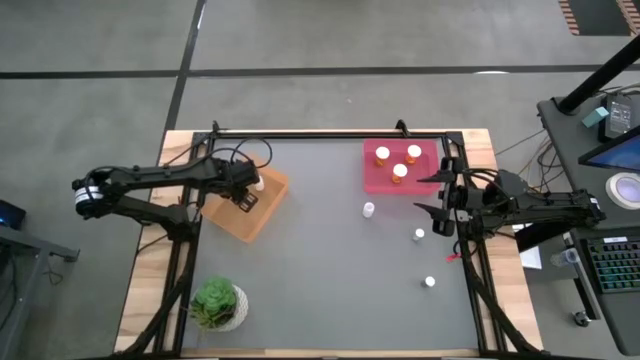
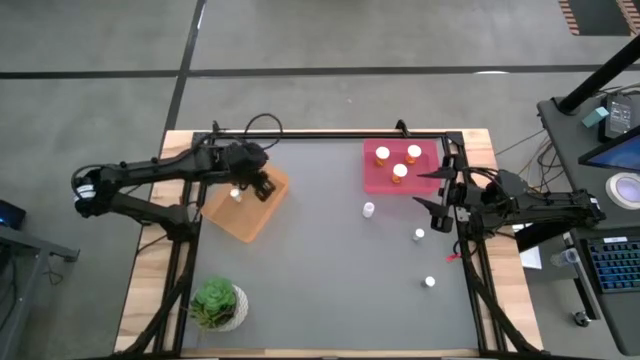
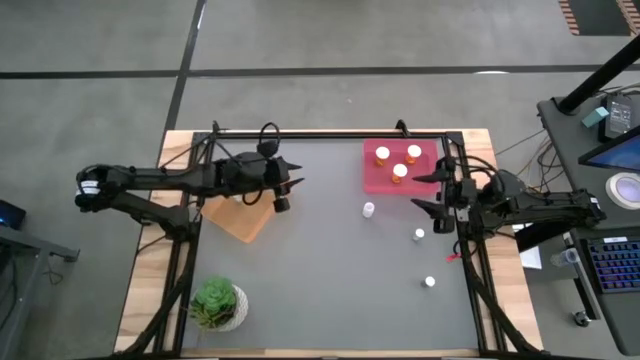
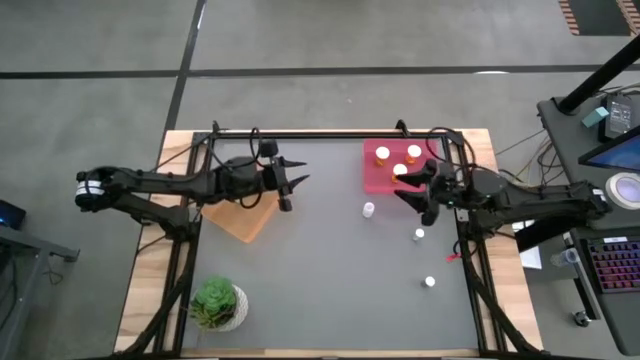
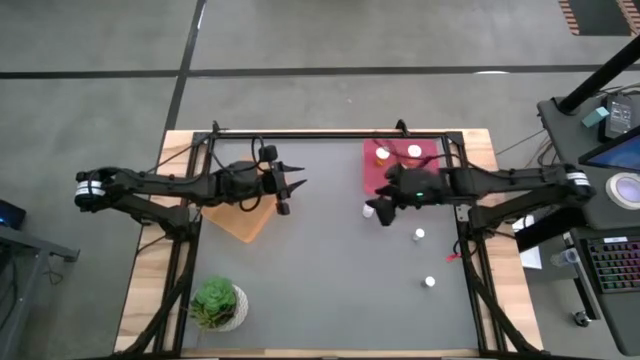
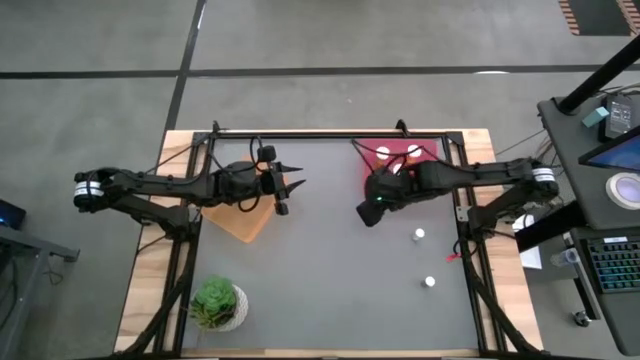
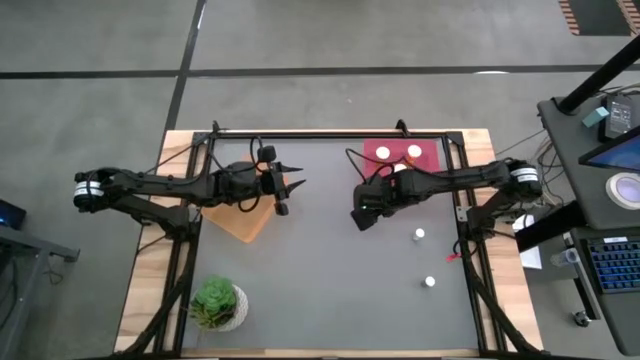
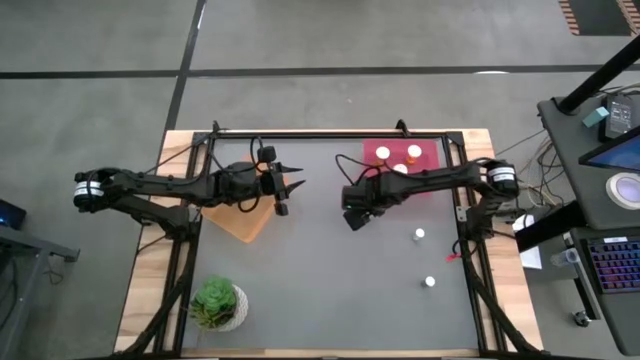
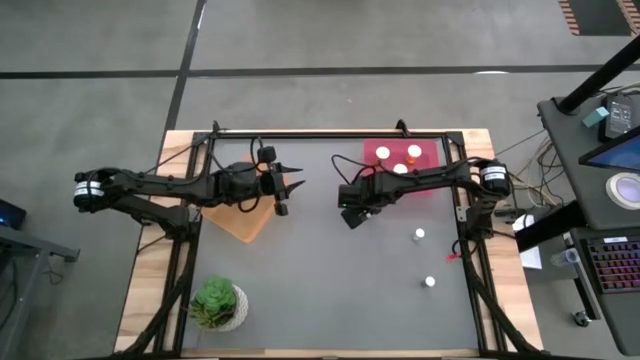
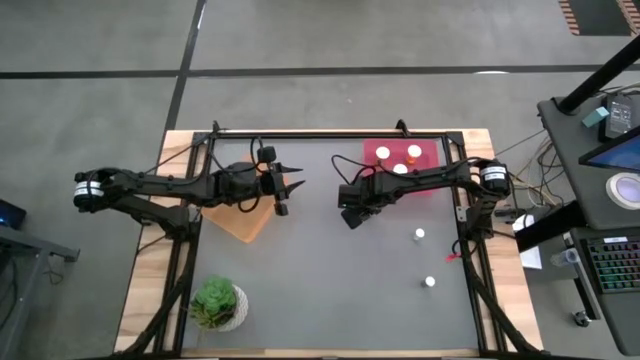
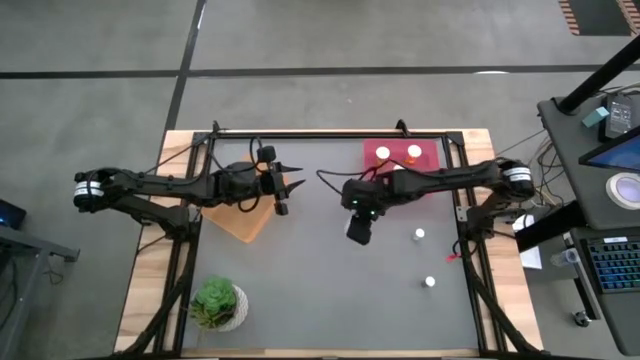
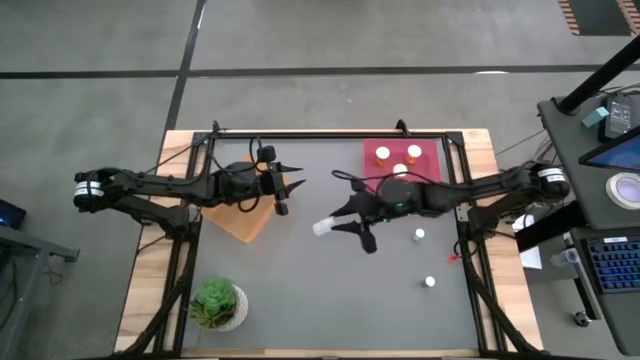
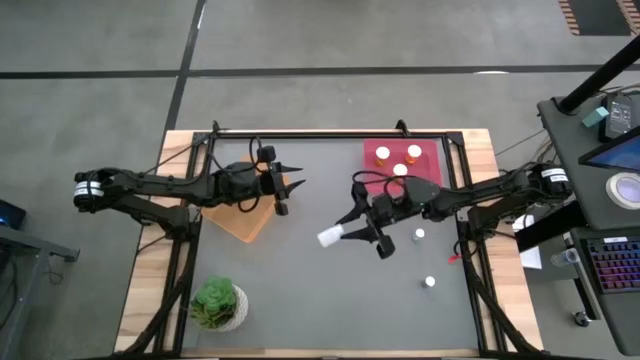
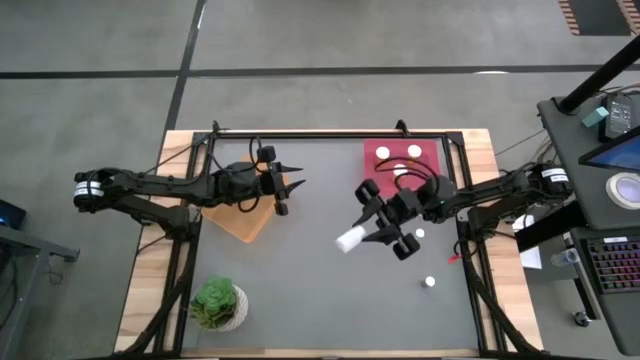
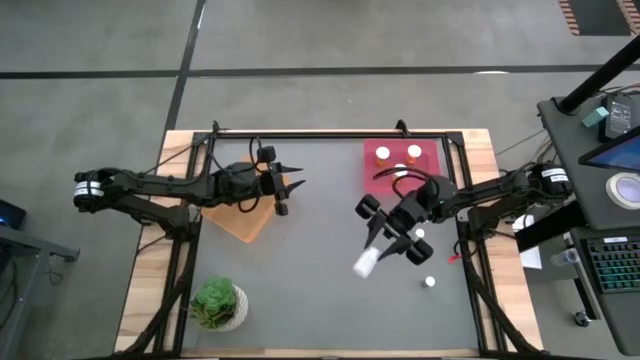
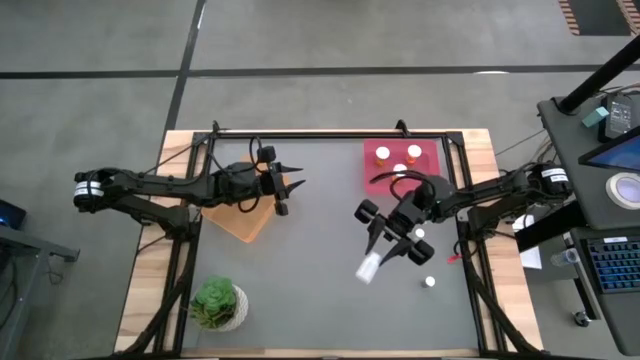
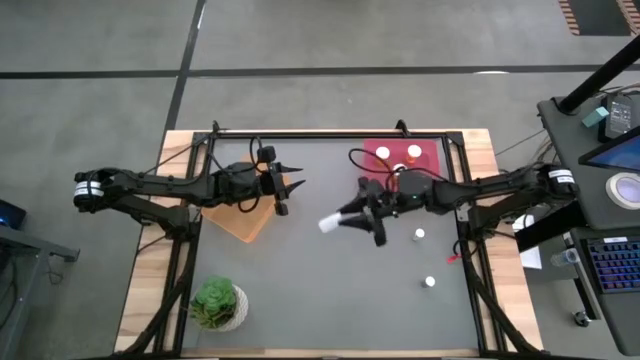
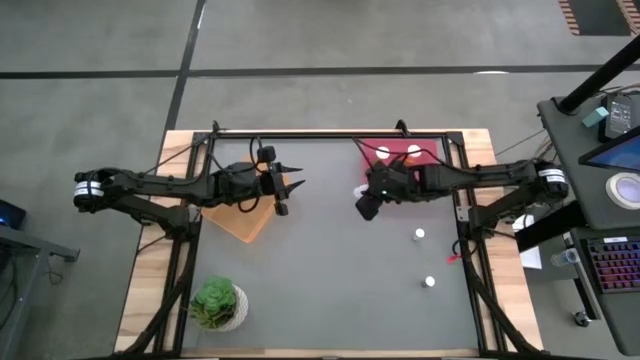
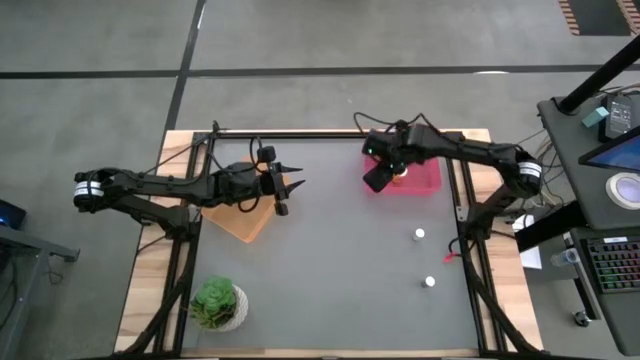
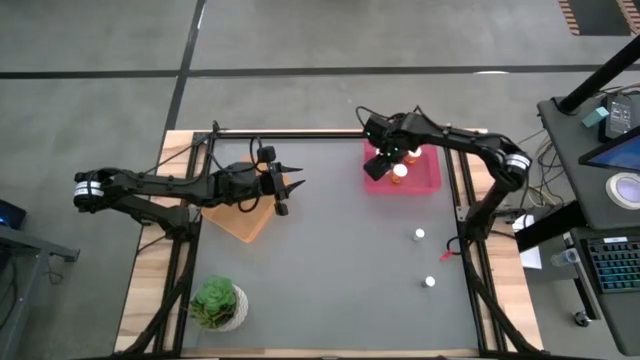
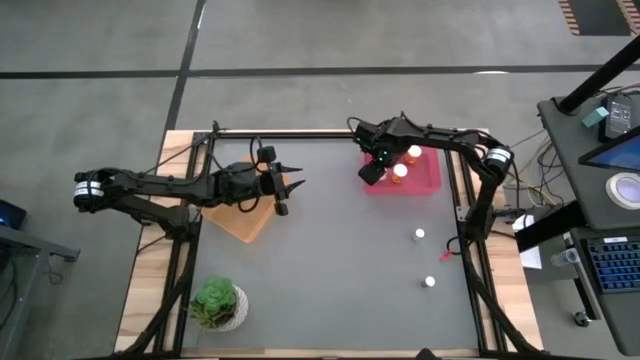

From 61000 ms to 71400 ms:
Task: Pick and place medicine bottles into bin by pill shape (circle, oval)
Put the transparent capsule bottle into the pink bin

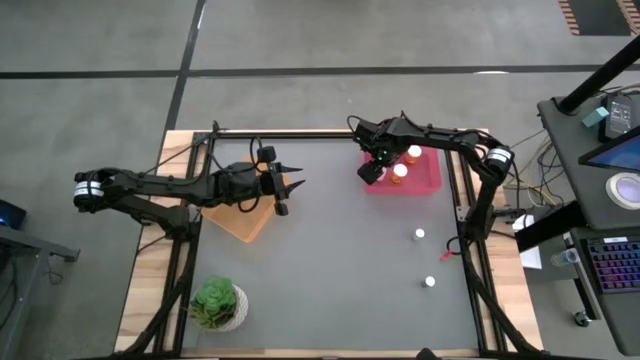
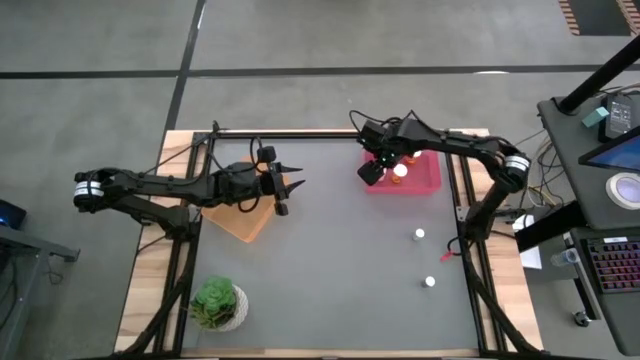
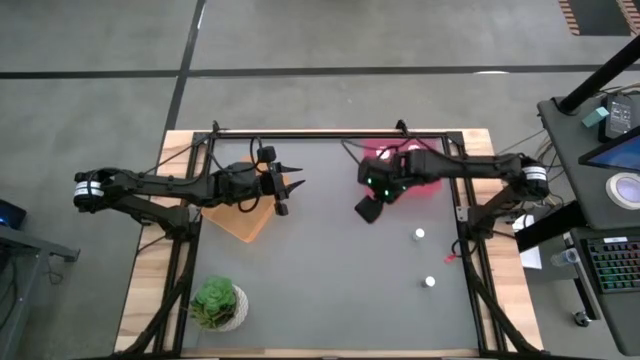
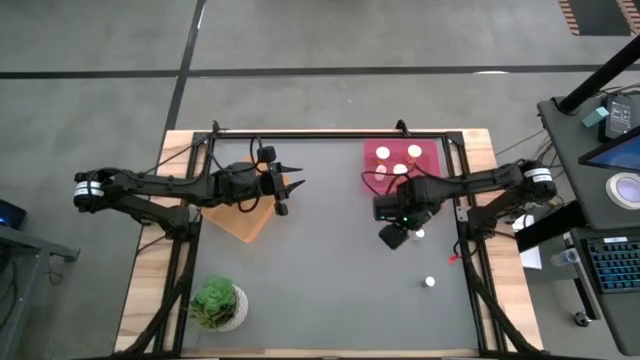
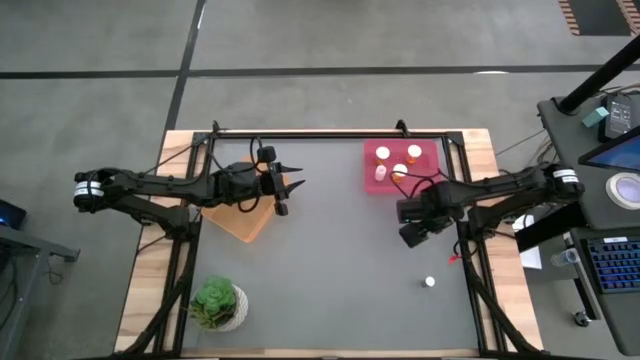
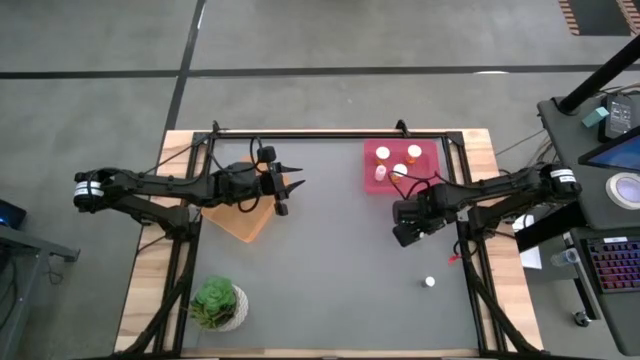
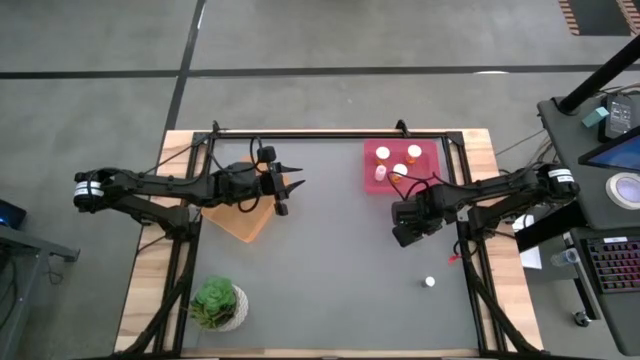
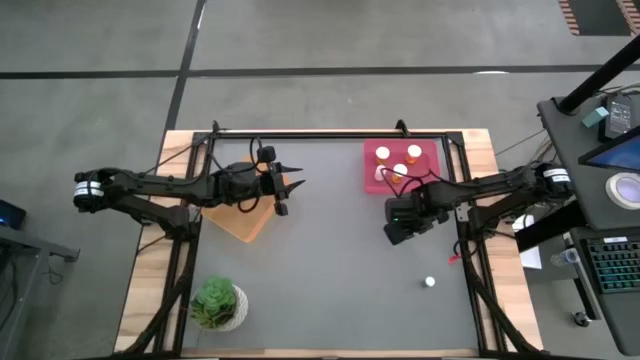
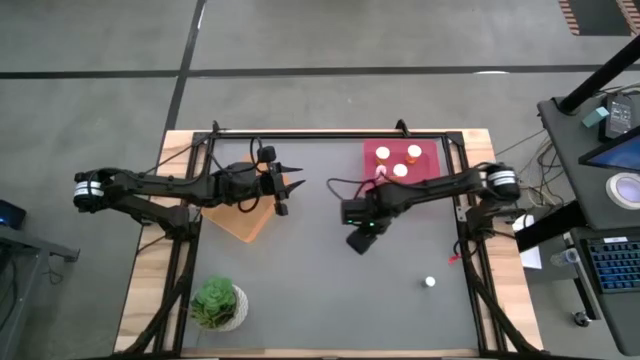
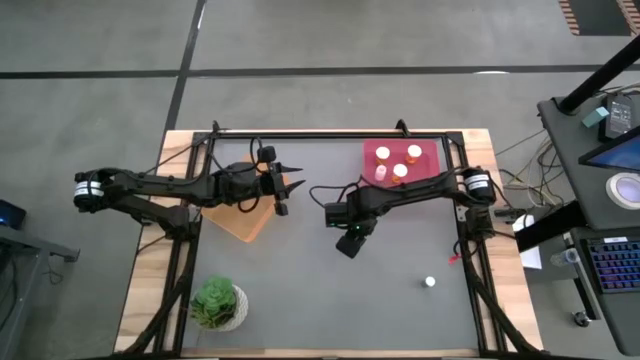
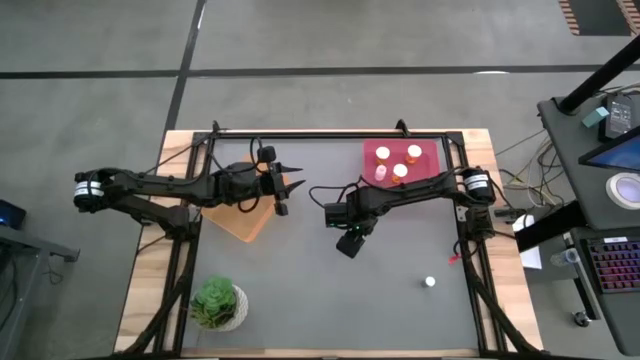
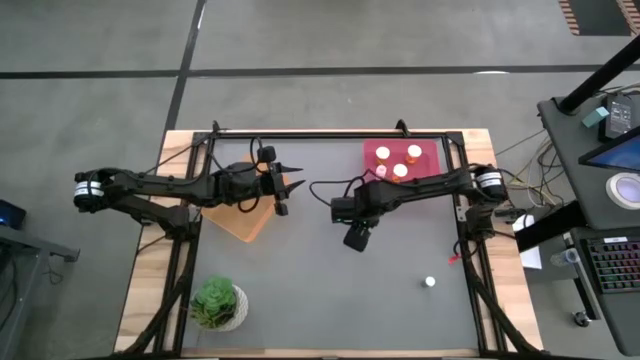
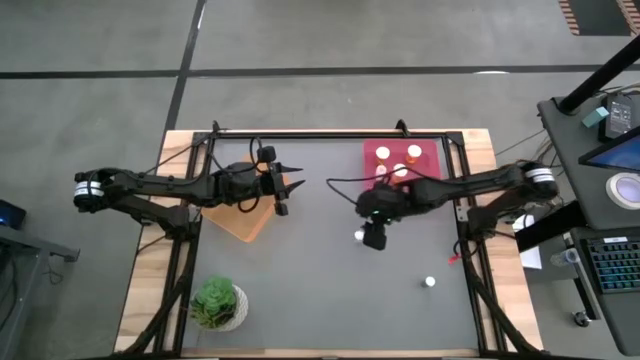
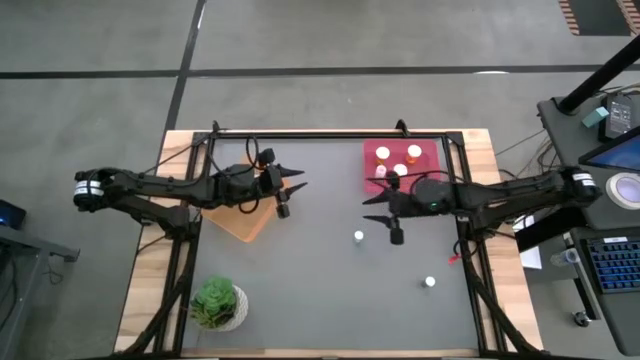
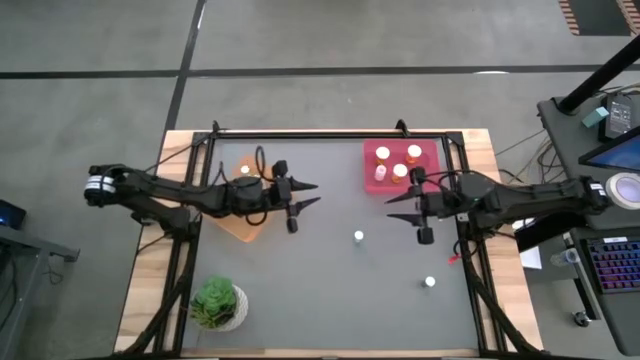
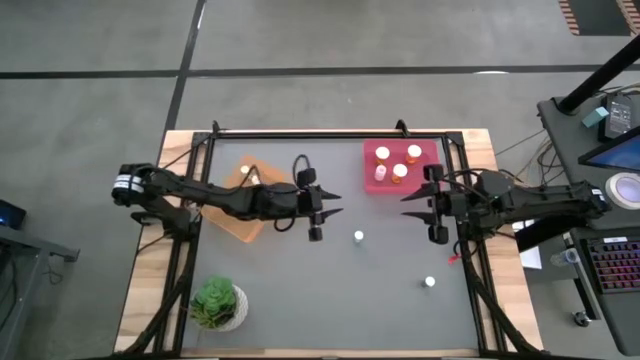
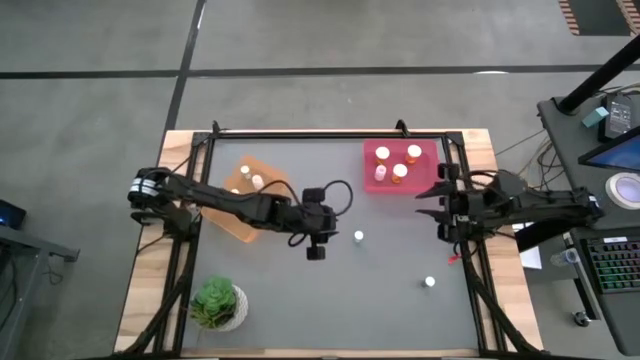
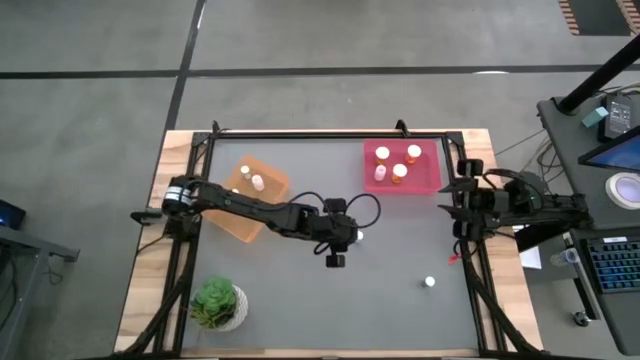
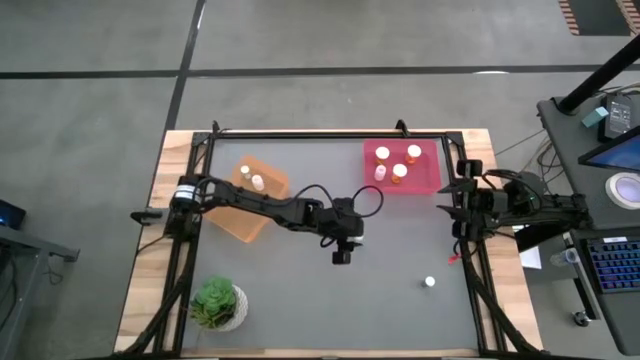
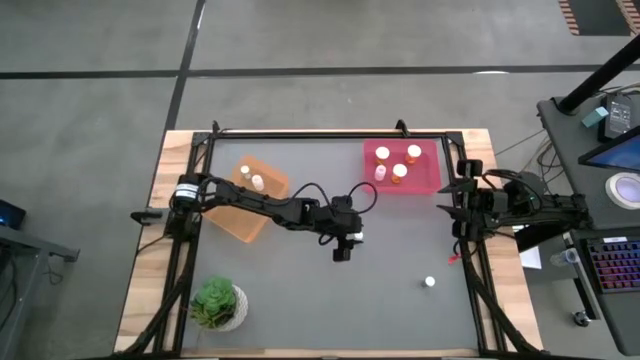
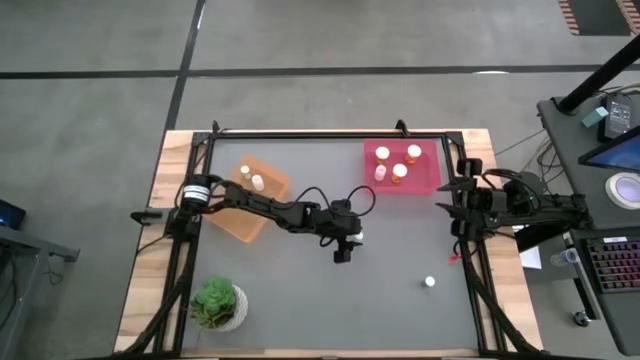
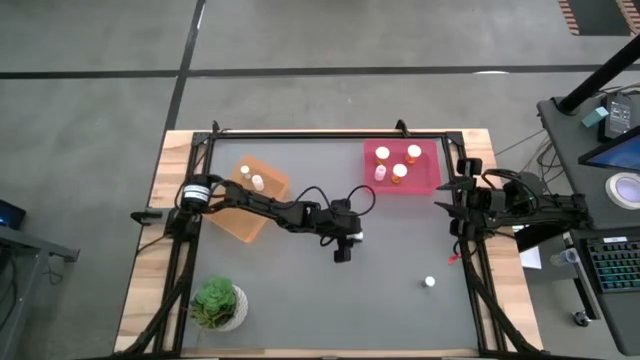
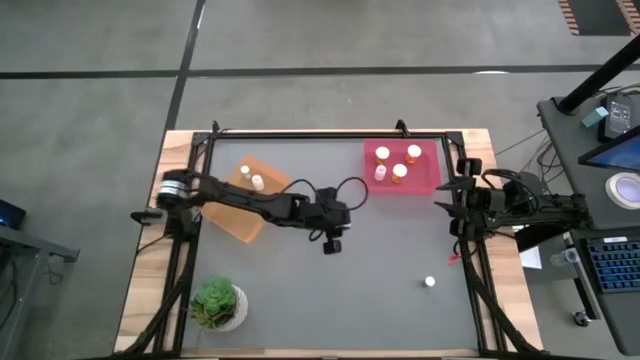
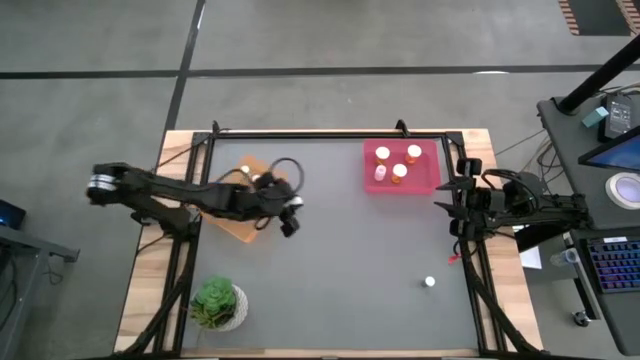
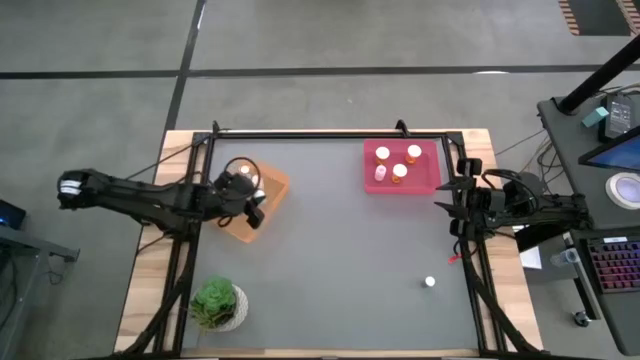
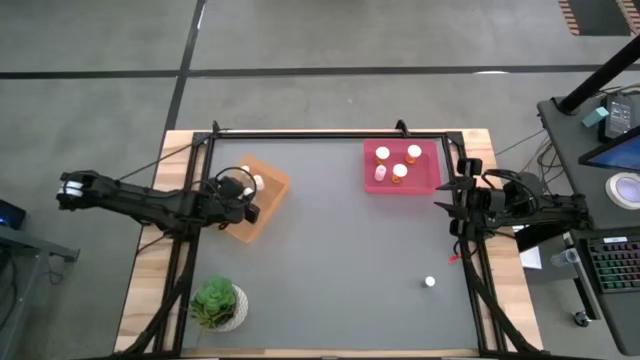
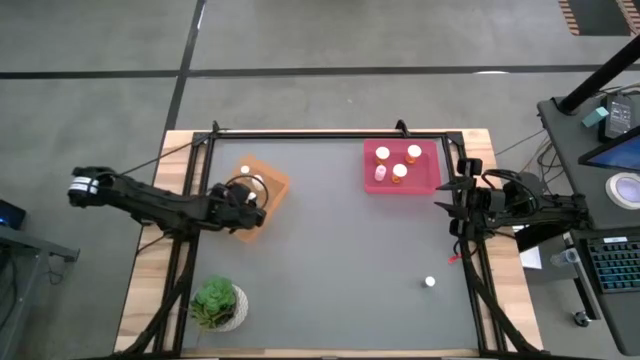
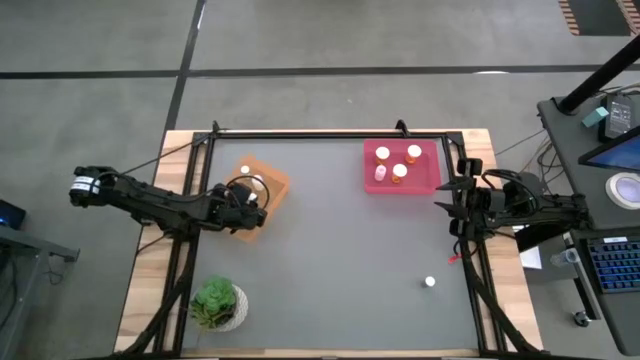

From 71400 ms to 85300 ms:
Put the blue tablet bottle into the orange bin
